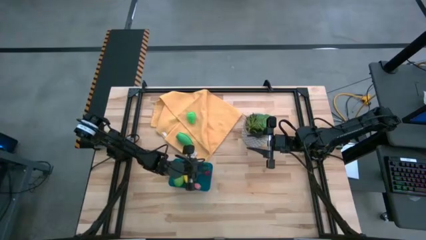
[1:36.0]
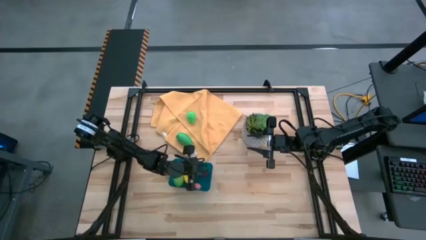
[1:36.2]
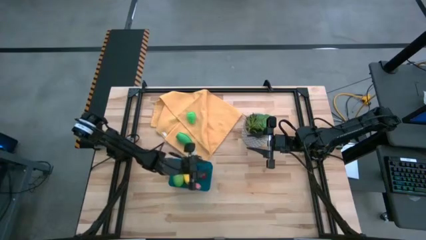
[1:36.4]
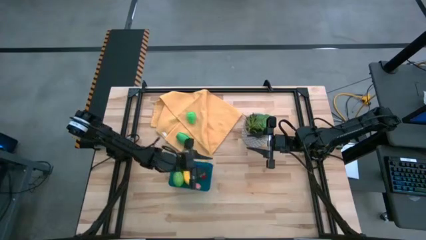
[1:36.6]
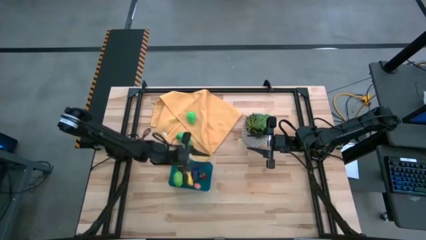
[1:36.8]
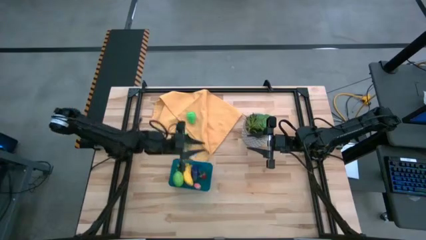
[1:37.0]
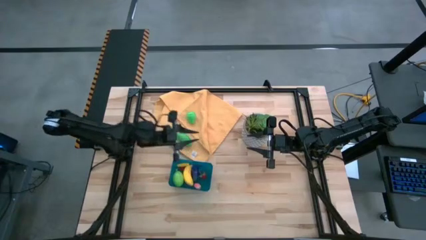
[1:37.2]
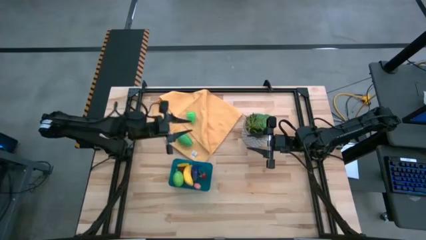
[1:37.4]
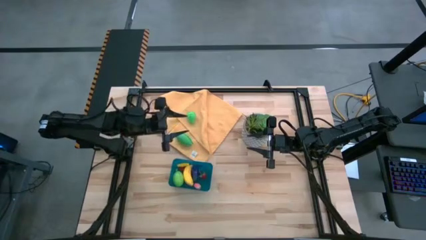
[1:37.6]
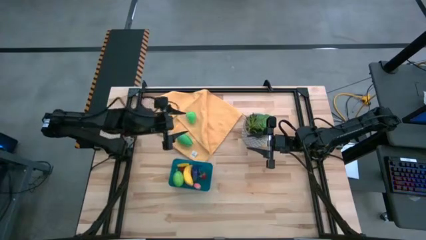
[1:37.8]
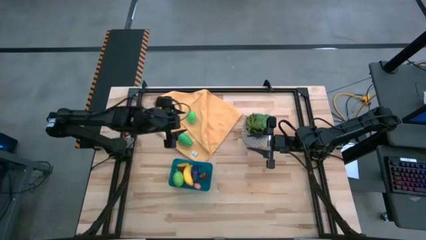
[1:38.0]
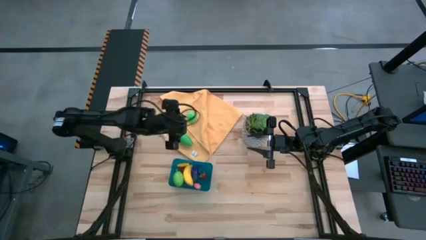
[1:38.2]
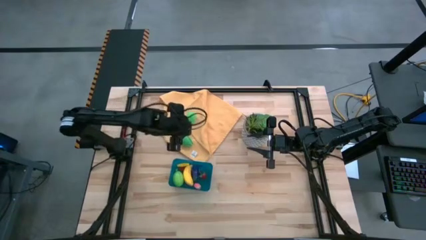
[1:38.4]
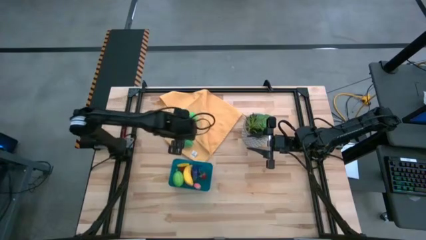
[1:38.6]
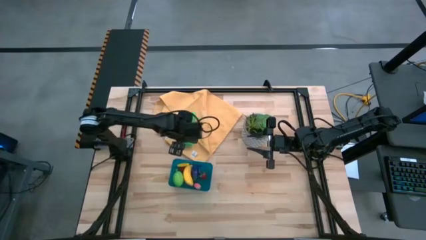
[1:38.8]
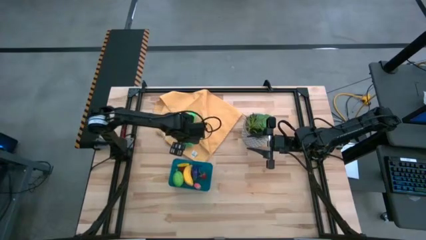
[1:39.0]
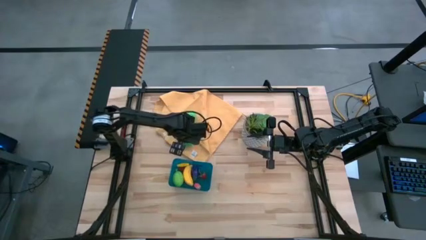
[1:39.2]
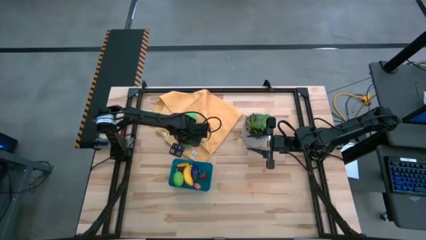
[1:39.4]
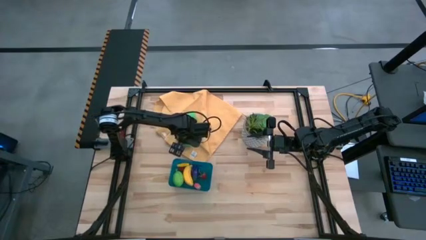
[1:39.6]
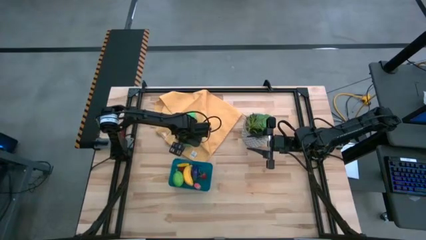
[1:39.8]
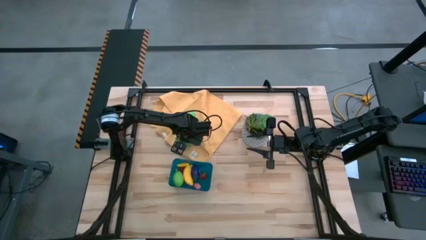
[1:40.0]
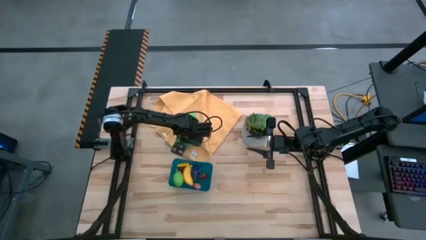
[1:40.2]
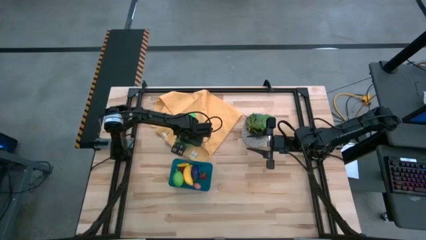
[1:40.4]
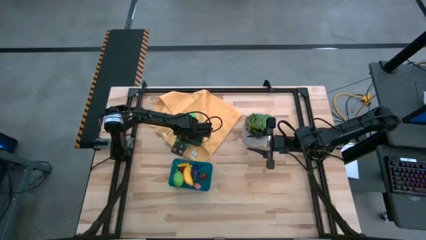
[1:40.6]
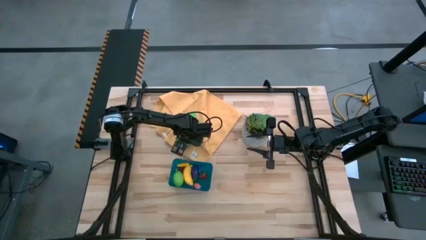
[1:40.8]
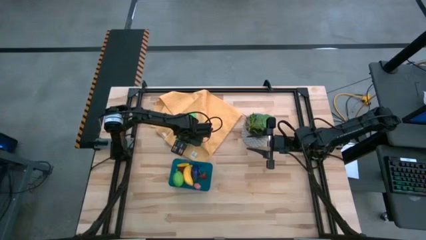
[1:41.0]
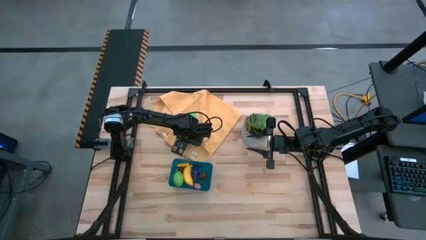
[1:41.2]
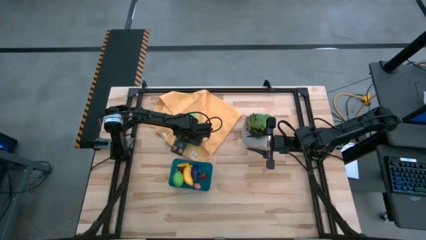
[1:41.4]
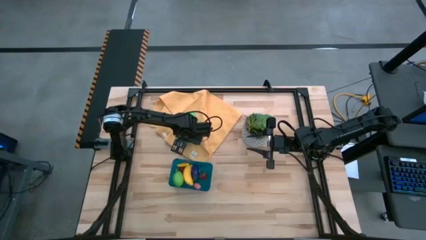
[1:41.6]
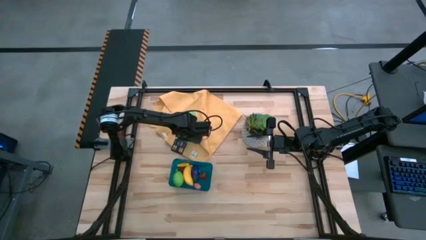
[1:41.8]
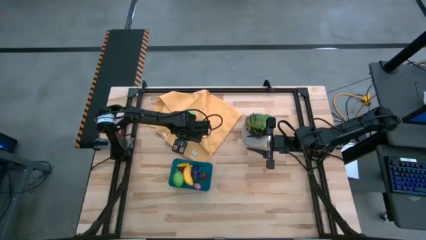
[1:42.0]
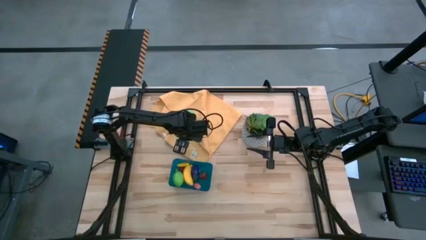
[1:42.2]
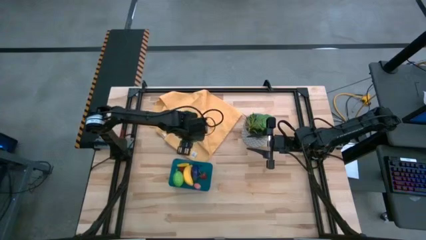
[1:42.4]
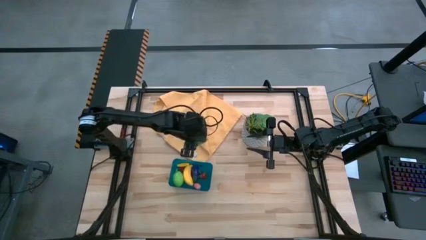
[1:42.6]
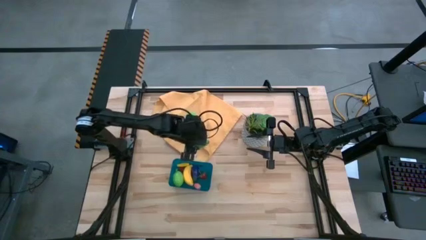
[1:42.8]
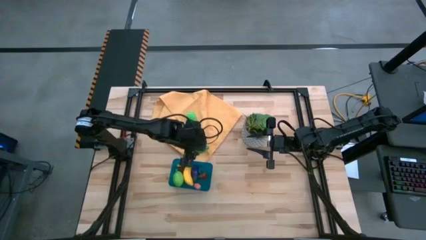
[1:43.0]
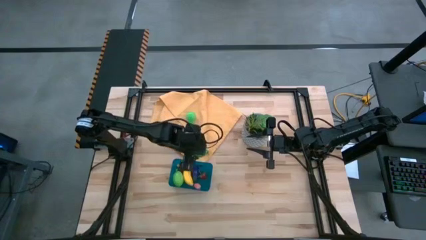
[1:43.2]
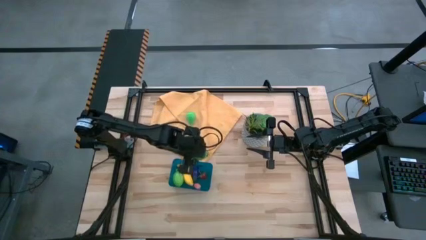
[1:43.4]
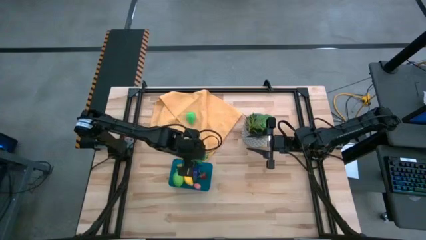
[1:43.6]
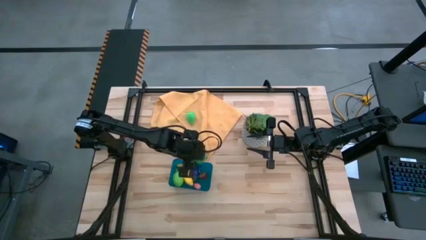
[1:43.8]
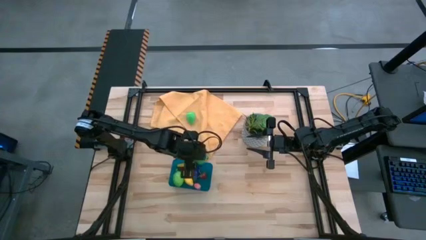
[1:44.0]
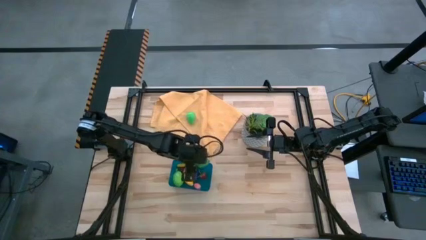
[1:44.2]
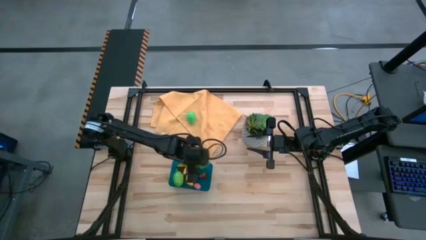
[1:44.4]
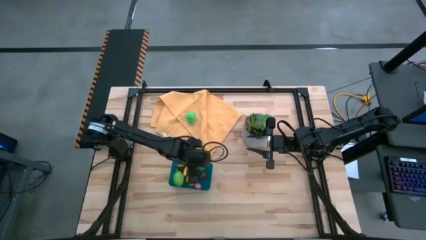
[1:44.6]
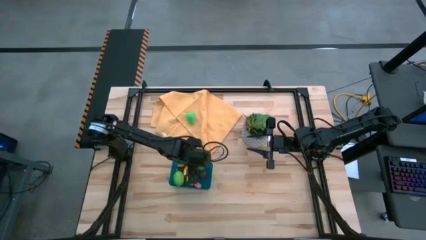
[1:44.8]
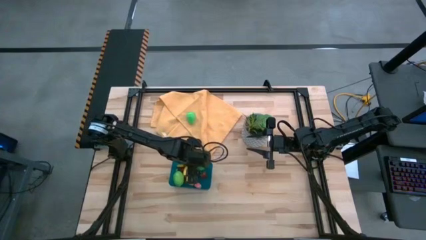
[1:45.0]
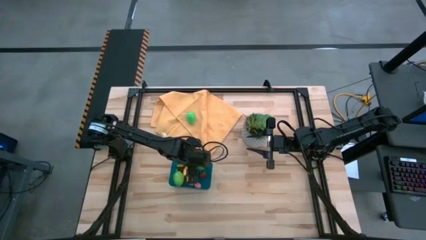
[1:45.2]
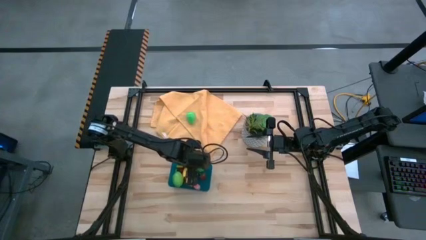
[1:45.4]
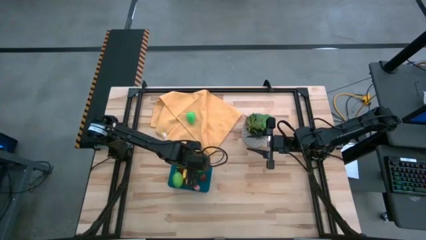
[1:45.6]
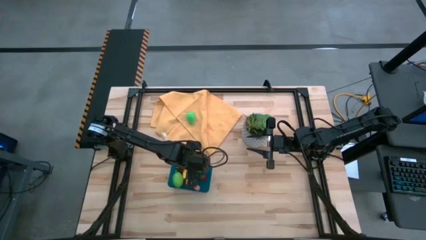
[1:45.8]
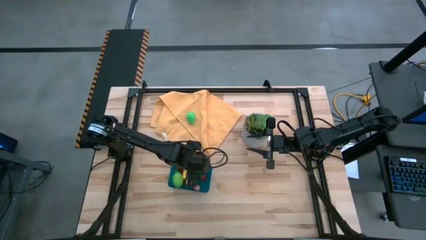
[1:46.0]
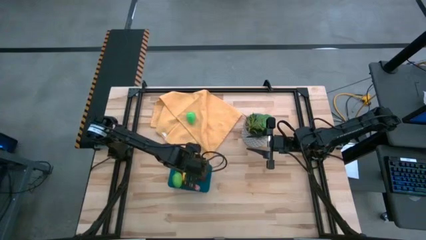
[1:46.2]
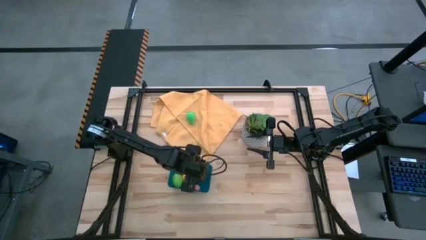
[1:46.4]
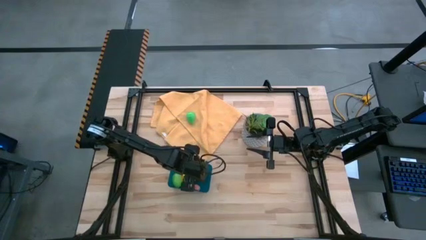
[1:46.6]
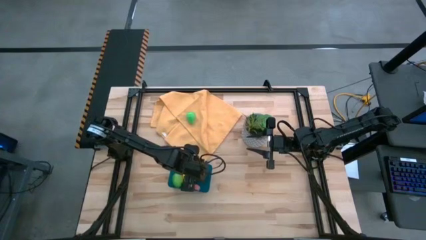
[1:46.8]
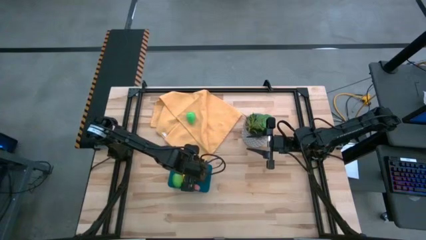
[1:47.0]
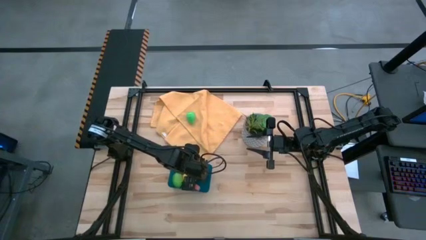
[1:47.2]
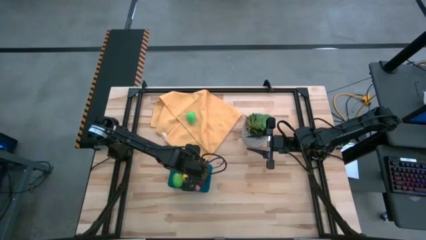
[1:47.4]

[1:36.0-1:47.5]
Task: Pick and placing Produce into tupperware
Put the corncob into the blue bin

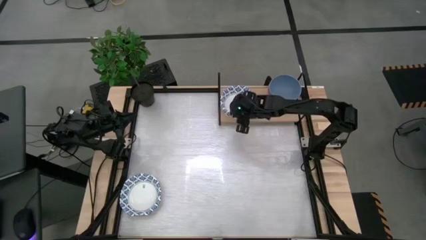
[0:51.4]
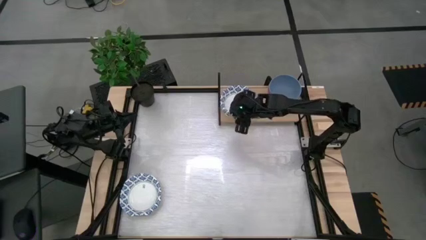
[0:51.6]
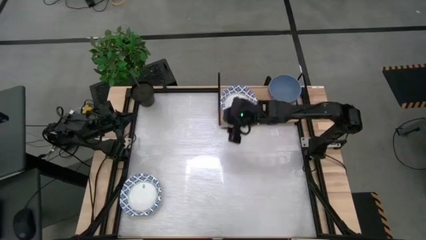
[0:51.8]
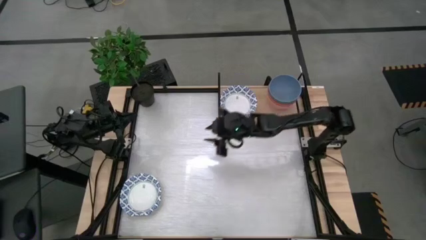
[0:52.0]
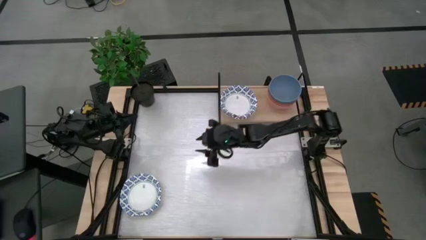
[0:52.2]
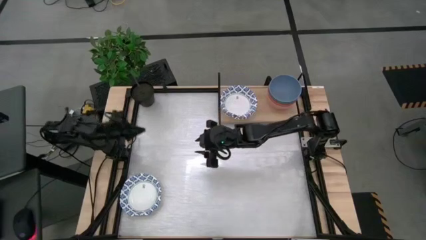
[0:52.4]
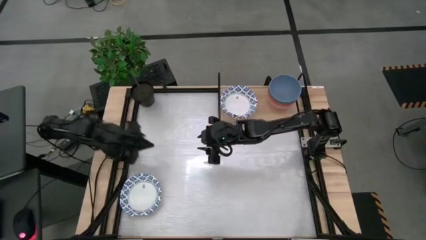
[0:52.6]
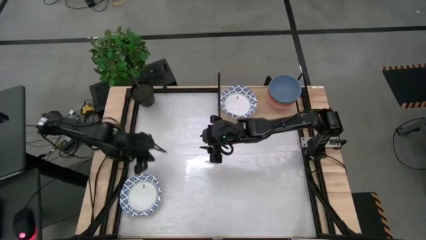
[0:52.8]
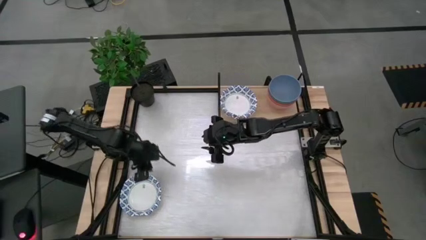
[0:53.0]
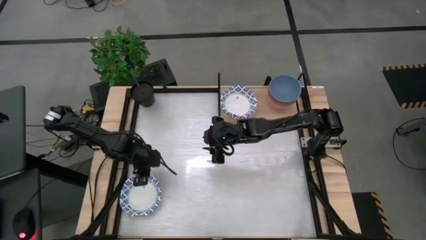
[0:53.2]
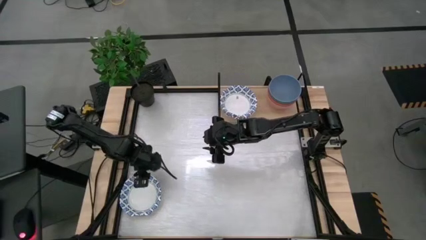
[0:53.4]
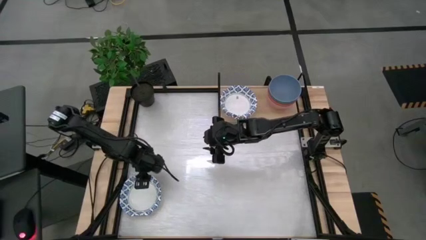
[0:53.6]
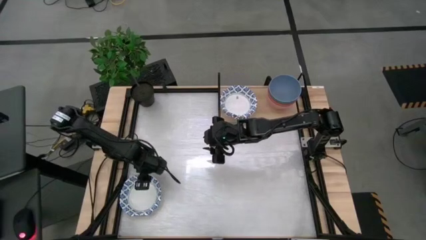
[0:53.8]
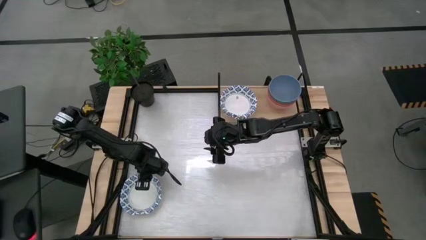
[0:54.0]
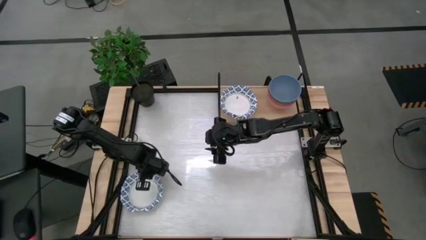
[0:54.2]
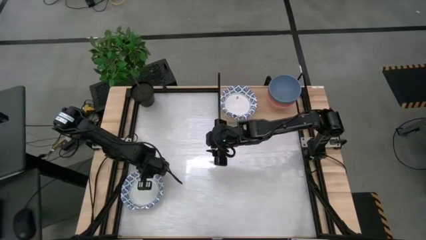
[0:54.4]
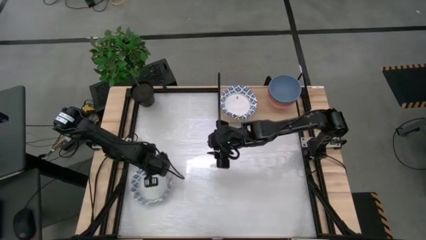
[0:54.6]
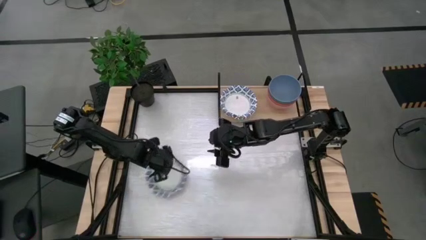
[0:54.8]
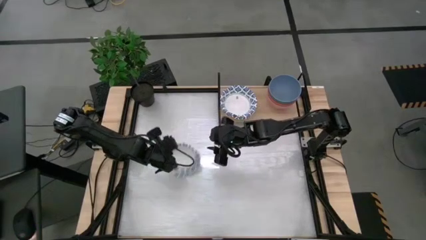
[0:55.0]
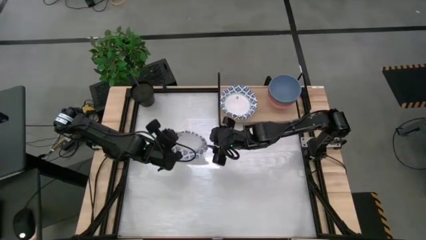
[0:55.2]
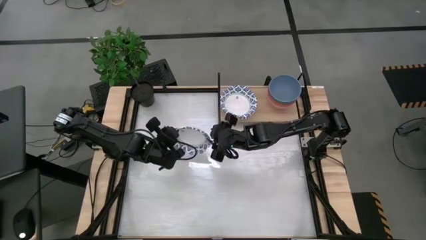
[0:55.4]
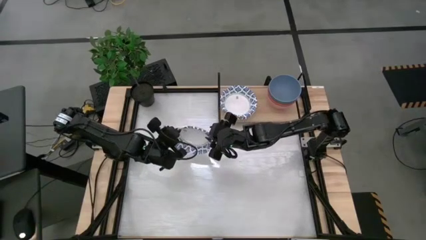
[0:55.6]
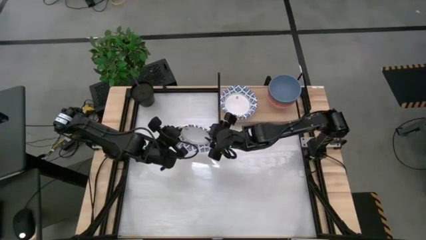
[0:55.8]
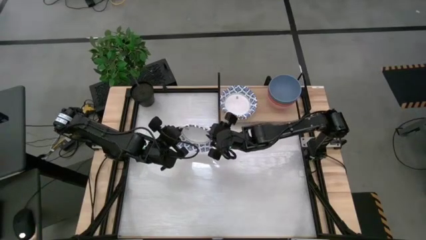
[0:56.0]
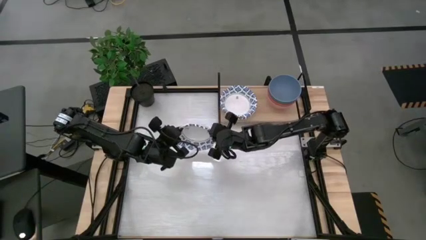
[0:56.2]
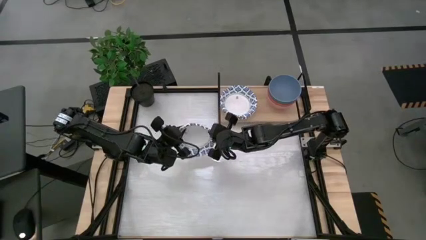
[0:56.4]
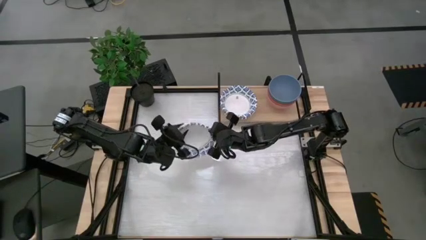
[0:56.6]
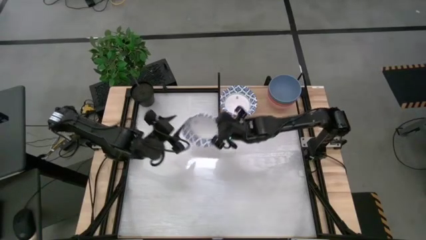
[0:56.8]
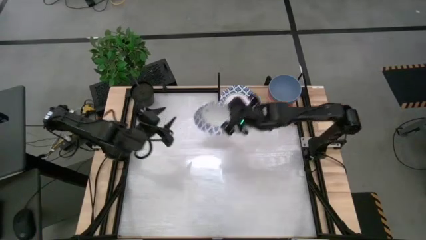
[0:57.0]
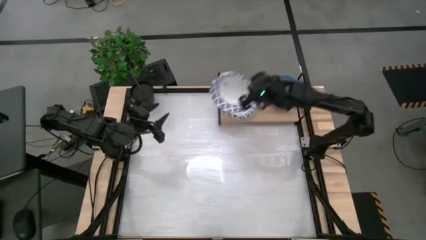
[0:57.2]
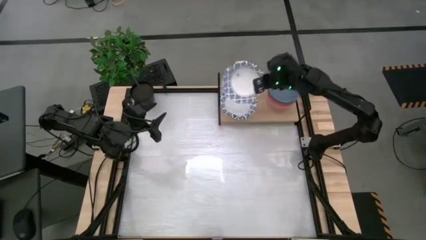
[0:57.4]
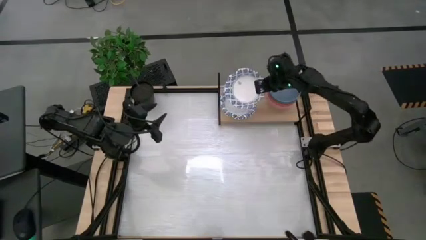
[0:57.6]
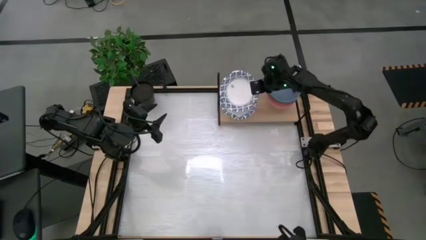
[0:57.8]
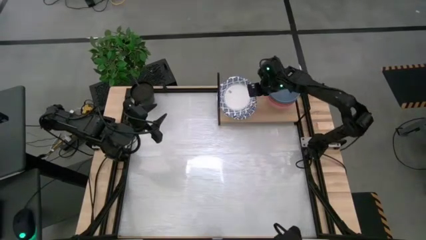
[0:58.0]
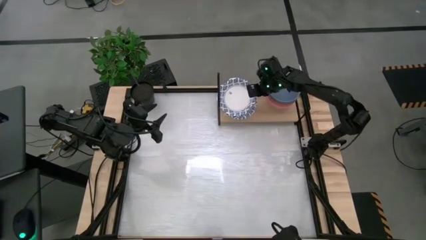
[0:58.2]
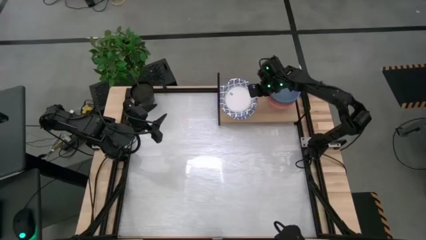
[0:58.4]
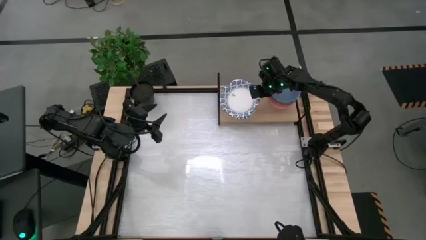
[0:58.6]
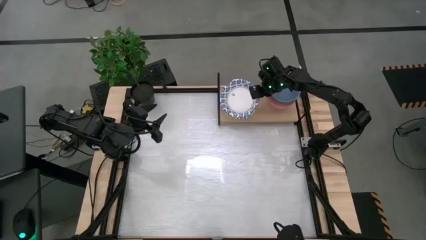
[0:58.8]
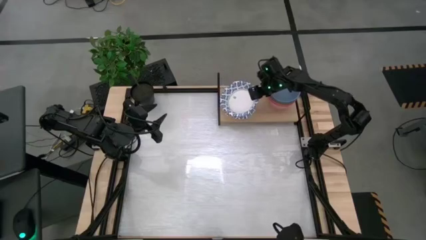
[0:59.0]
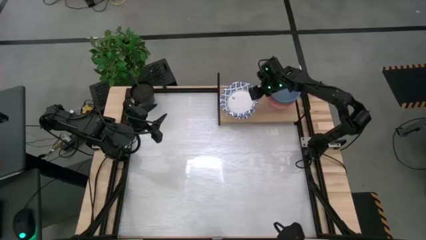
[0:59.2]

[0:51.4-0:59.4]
Task: Place and stack bowls onto a shelf
Stack the blue pattern bowl on top of the other blue pattern bowl on the shelf
